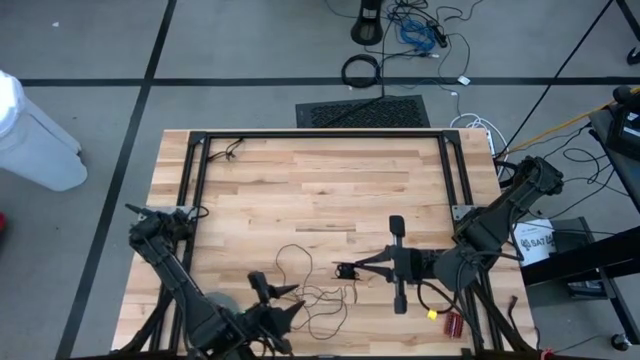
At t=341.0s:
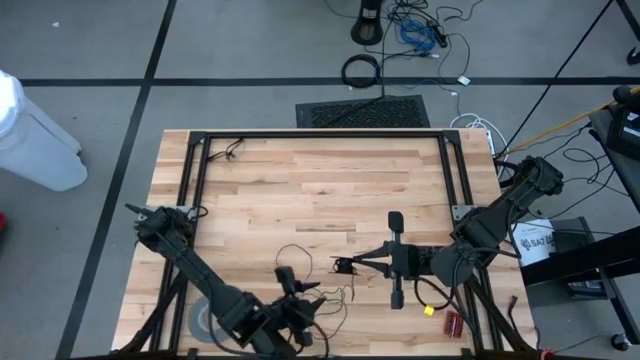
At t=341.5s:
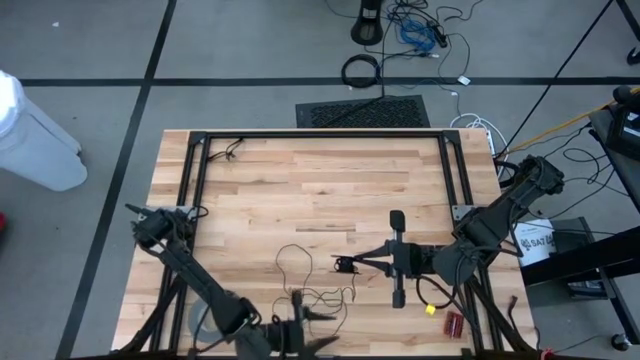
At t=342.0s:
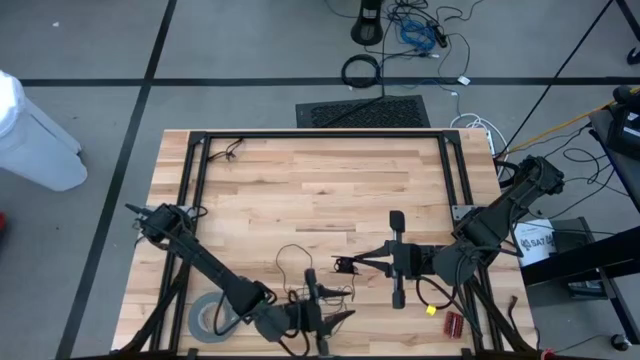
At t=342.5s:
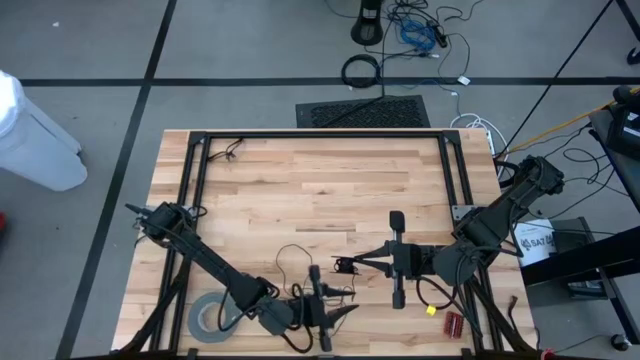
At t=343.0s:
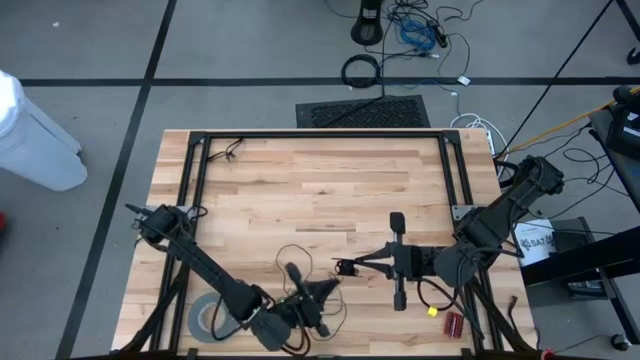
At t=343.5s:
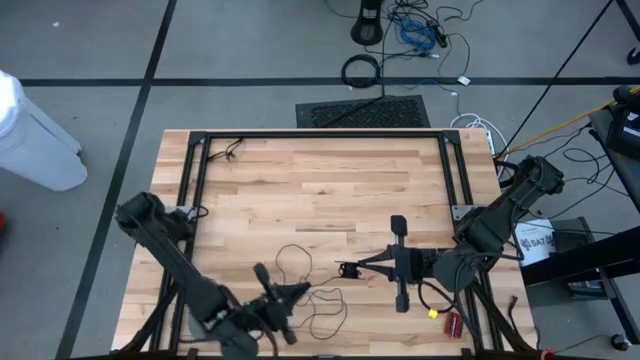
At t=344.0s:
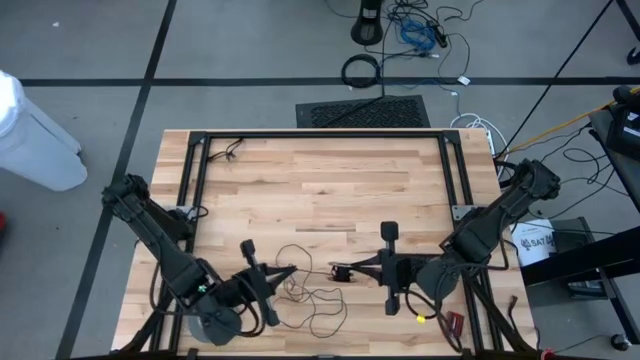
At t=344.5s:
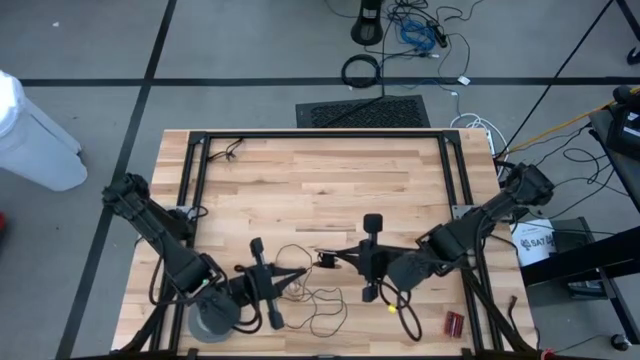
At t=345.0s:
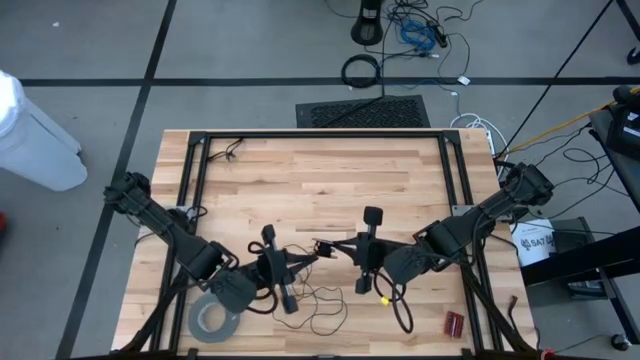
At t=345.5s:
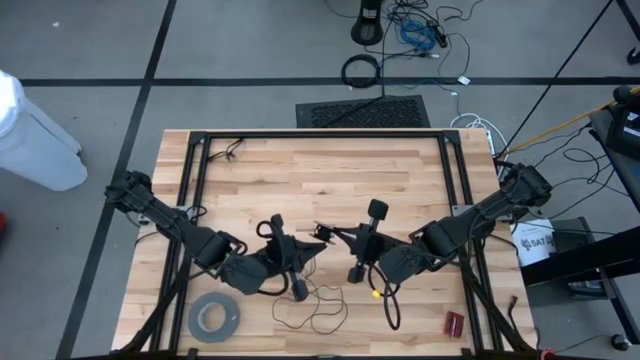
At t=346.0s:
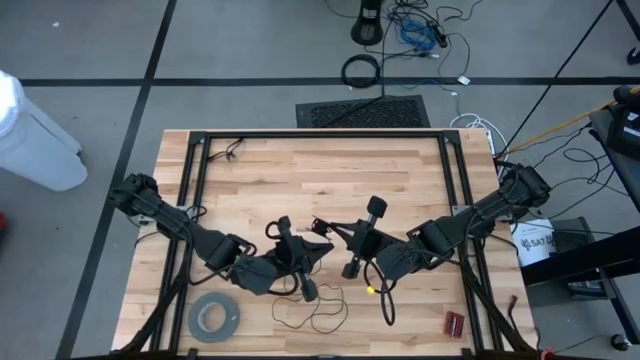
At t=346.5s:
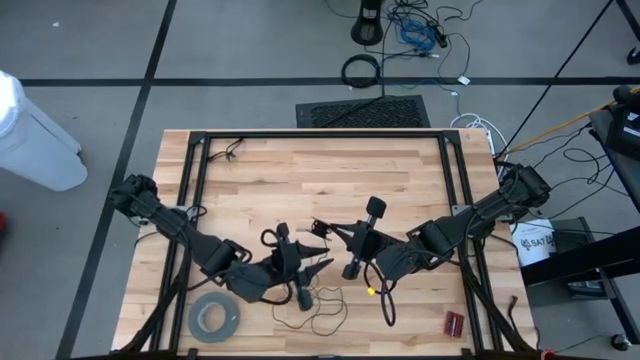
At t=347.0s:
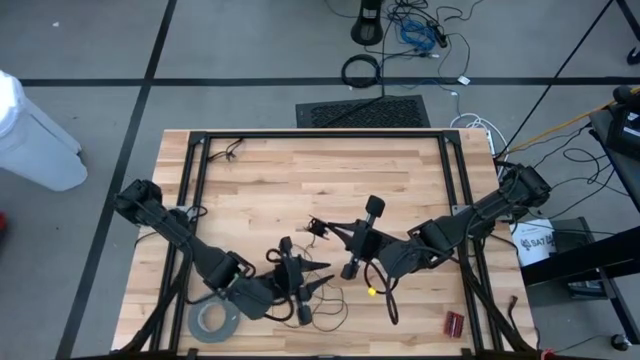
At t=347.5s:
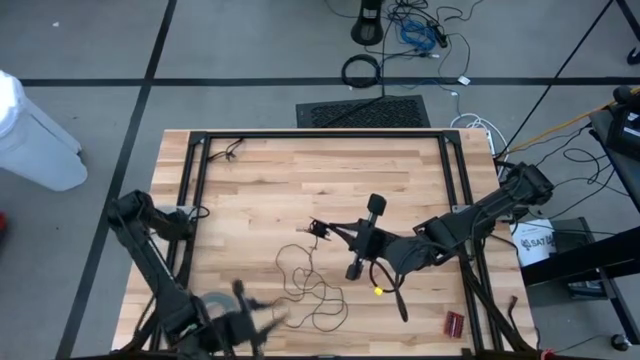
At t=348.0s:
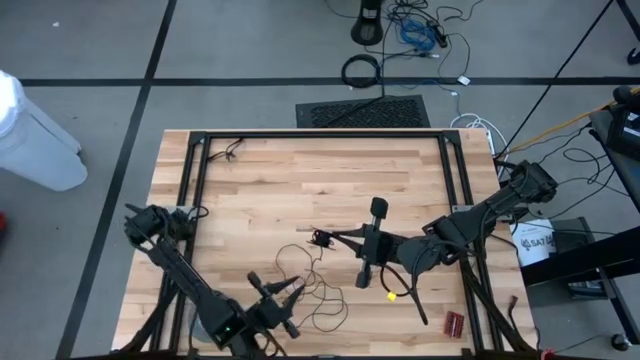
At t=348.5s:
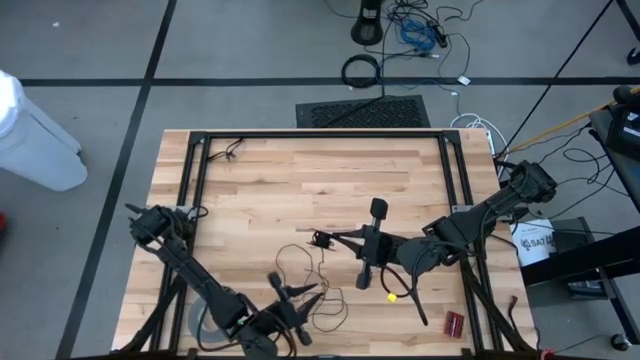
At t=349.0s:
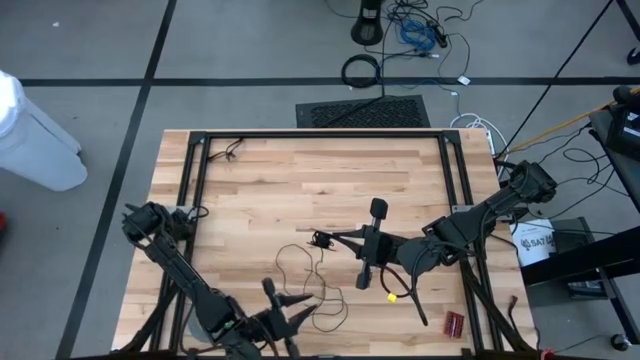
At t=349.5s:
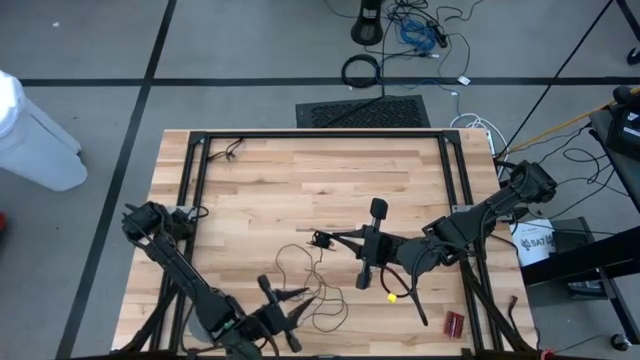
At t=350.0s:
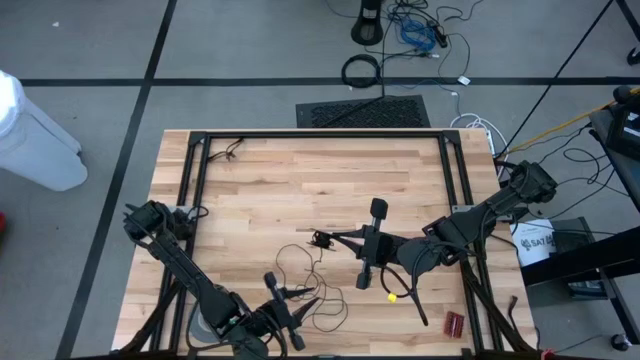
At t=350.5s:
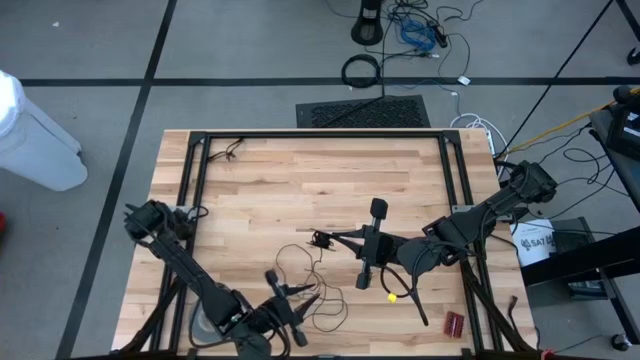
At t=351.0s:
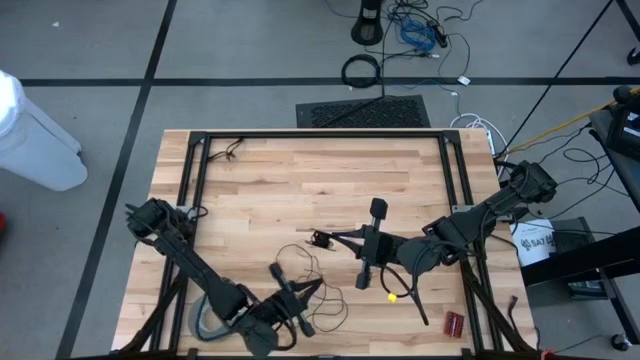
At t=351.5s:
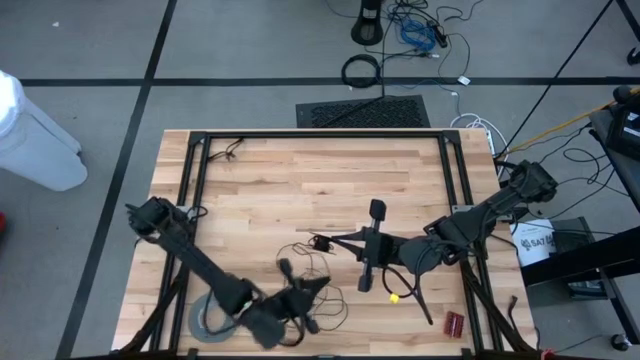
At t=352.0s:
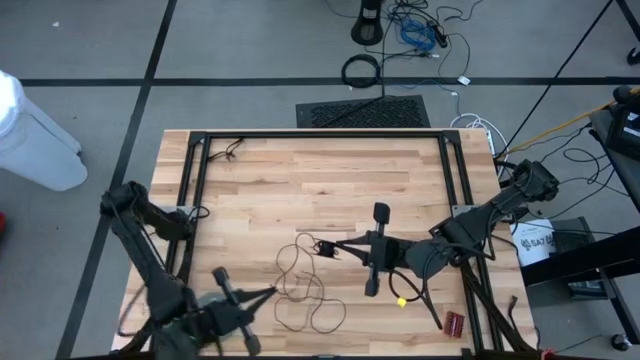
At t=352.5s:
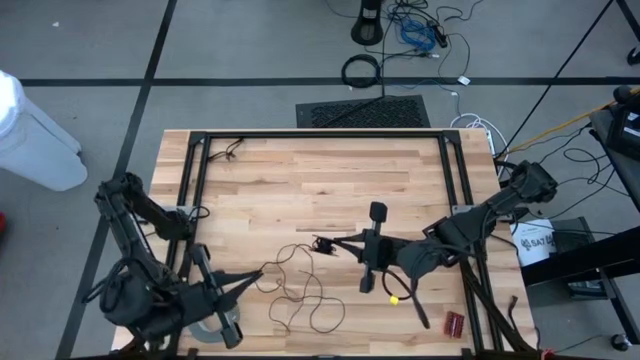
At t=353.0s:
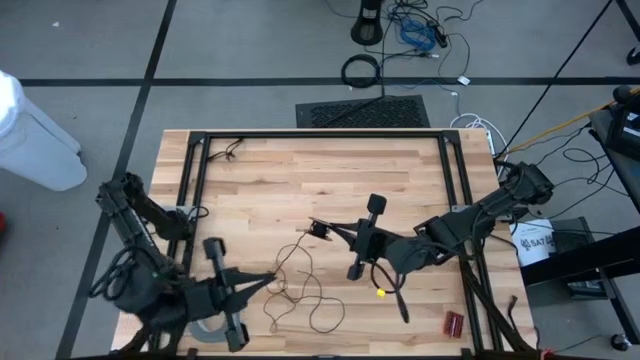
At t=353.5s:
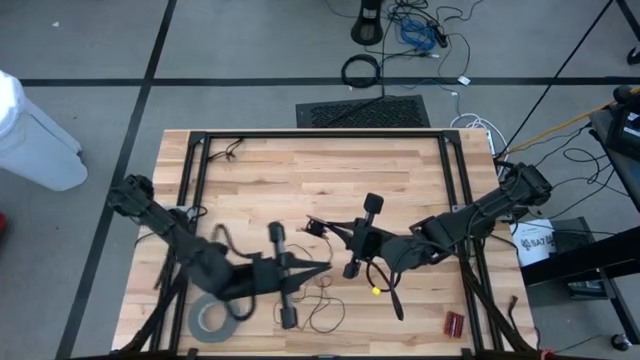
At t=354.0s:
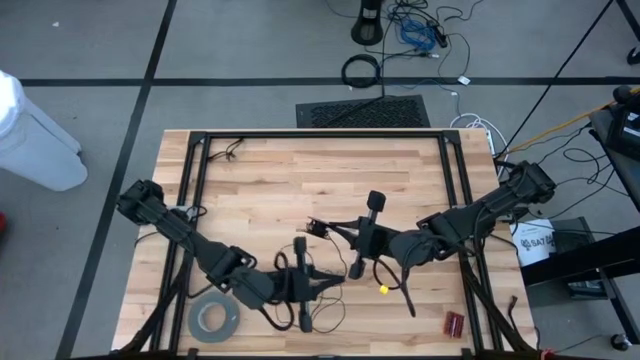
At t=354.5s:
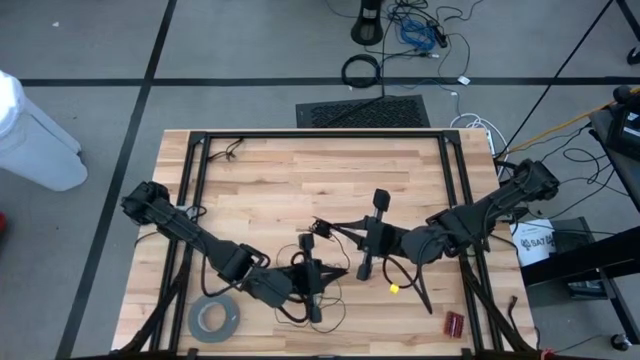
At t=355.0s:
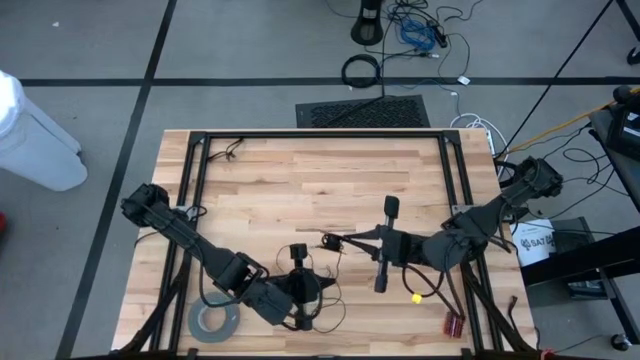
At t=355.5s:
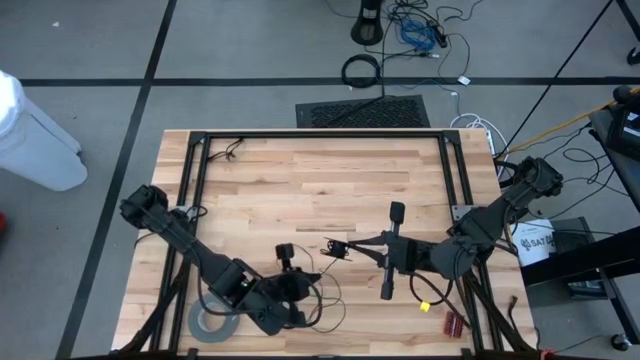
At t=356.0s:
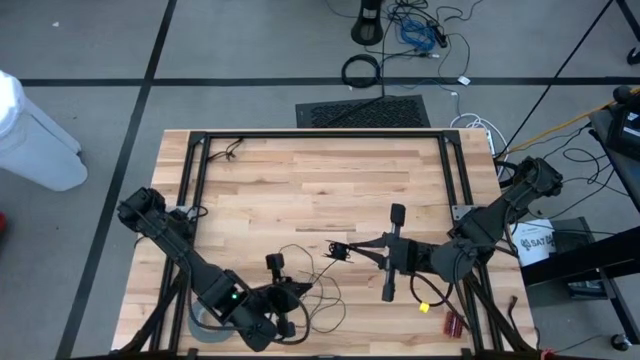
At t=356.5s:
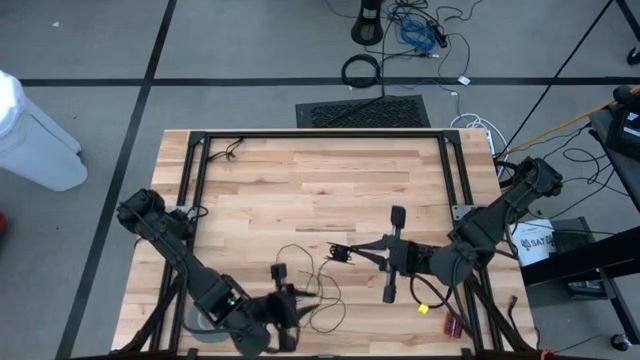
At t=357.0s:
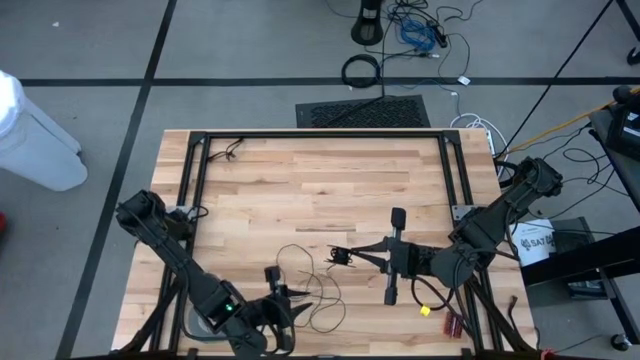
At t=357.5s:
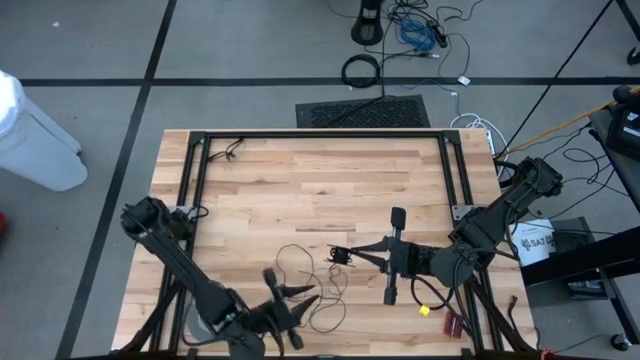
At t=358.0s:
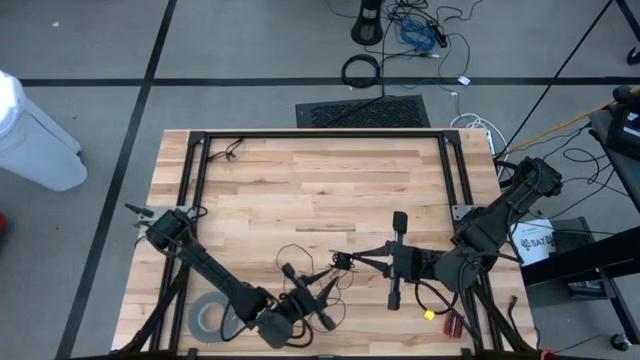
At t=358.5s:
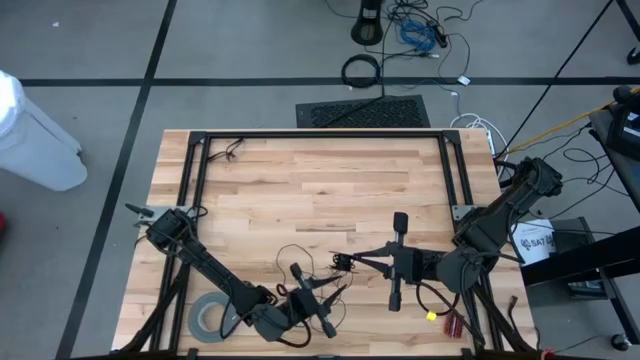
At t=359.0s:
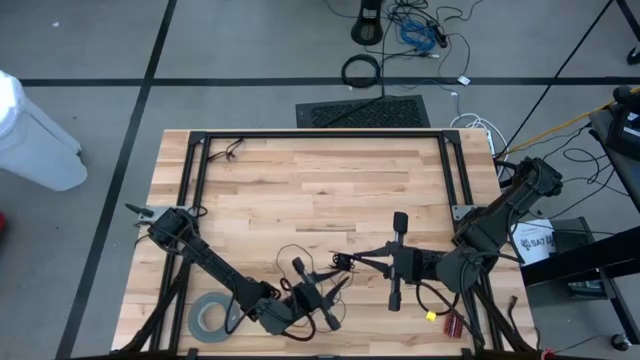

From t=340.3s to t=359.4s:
Task: Coil cords
Coil the black wire onto the spool
